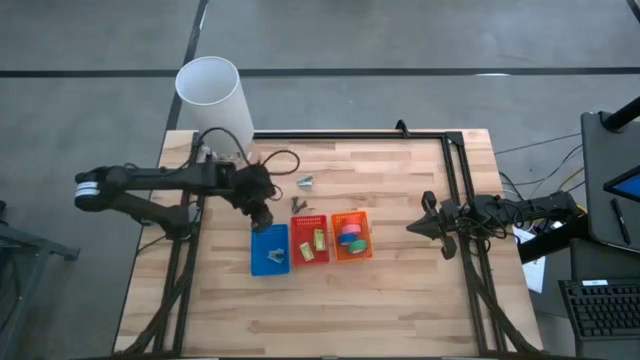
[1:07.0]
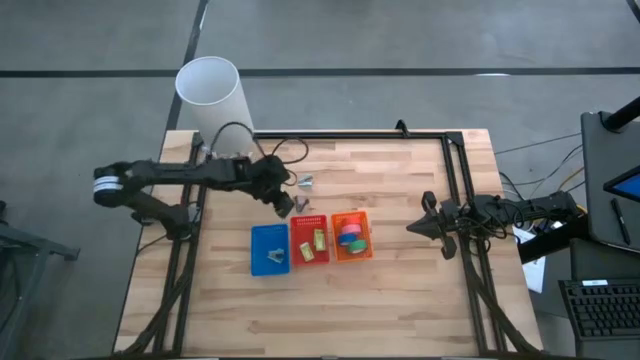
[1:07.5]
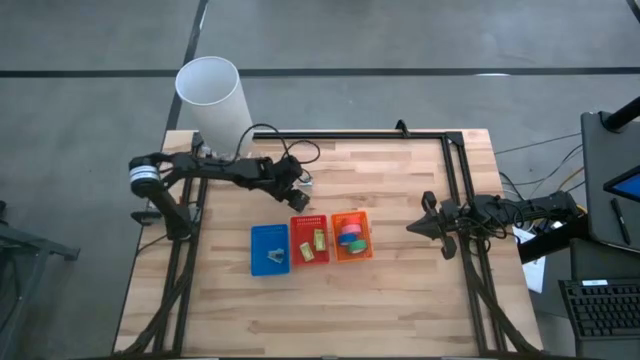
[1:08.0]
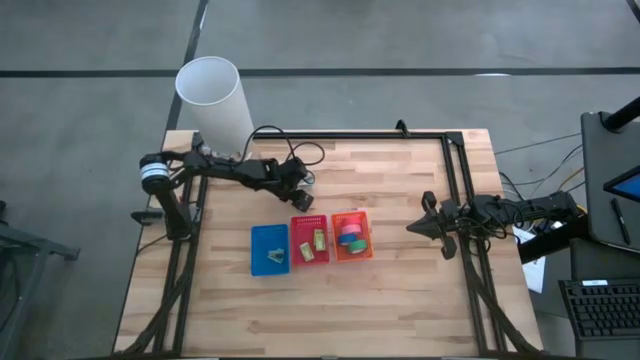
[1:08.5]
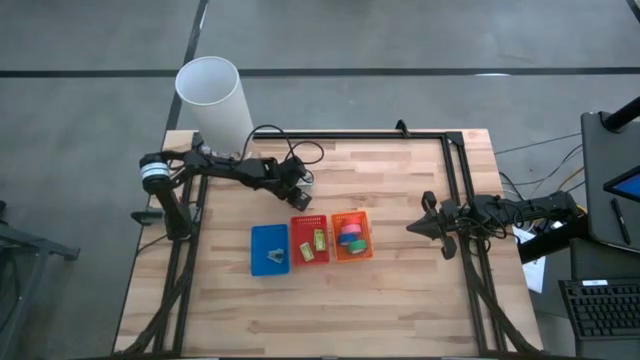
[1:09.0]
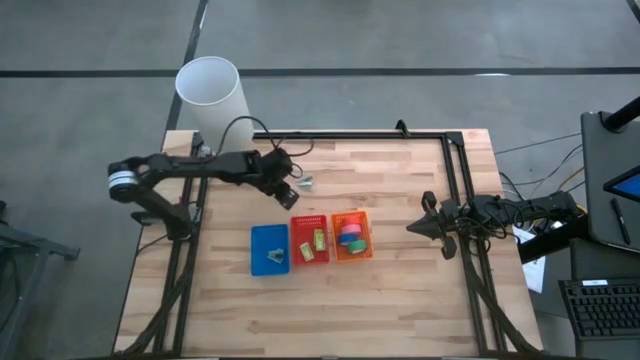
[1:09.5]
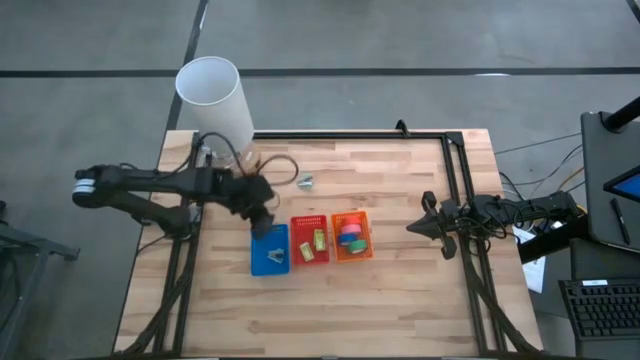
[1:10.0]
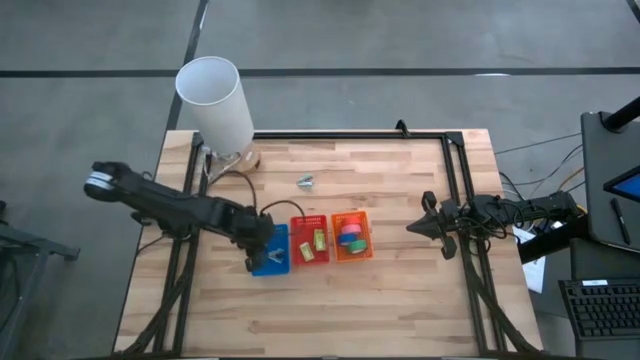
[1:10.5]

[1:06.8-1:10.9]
Task: Pick and place Stapler, Stapler remover, tape
Put the dark blue staple remover into the blue bin

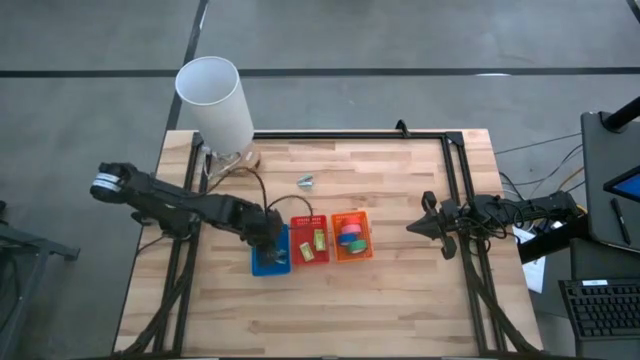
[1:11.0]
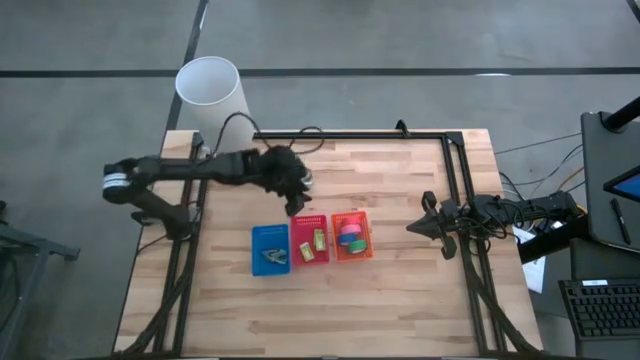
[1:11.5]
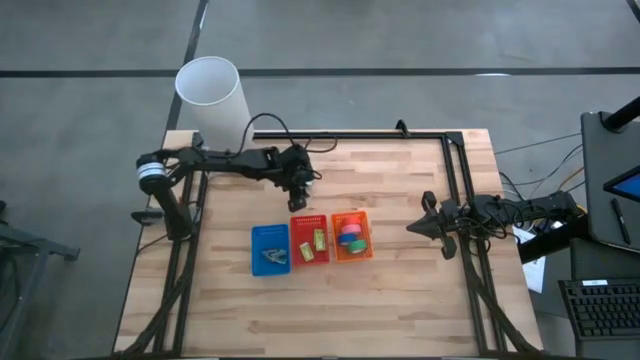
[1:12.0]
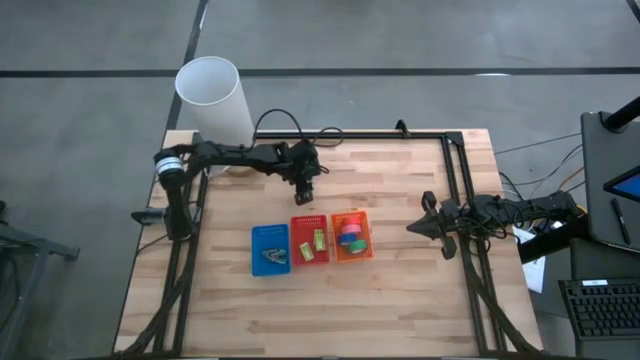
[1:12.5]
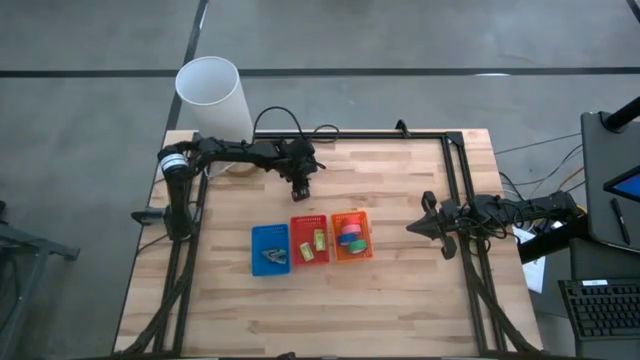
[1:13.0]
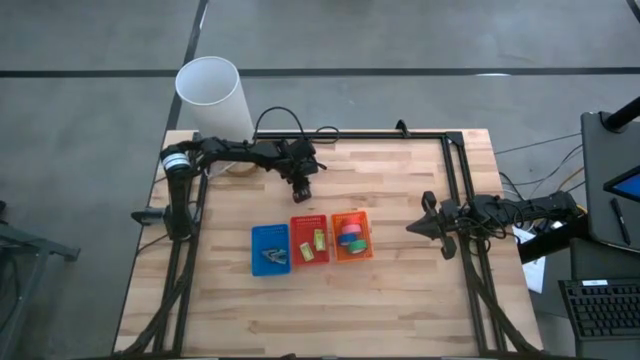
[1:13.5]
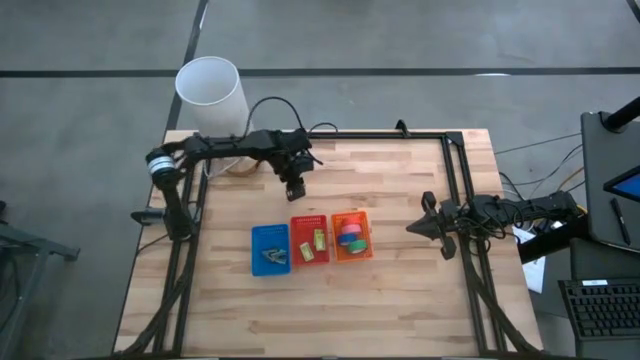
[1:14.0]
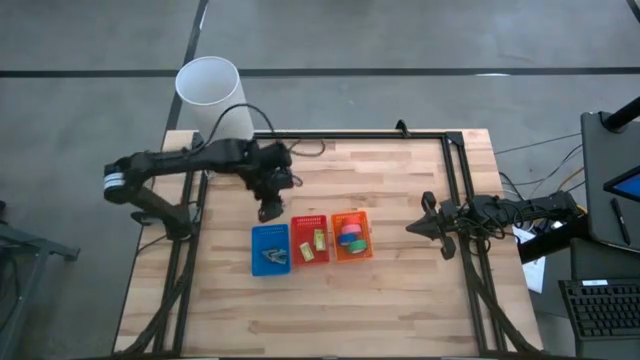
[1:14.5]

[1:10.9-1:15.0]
Put the light blue staple remover into the blue bin

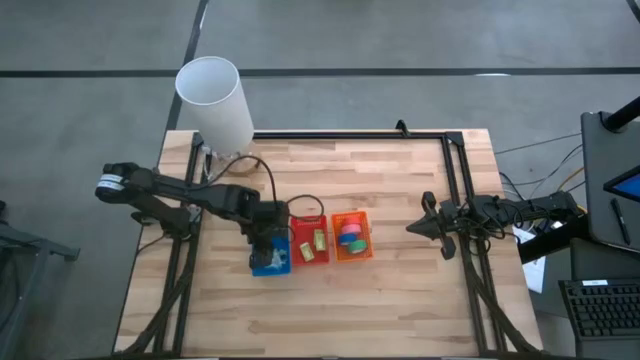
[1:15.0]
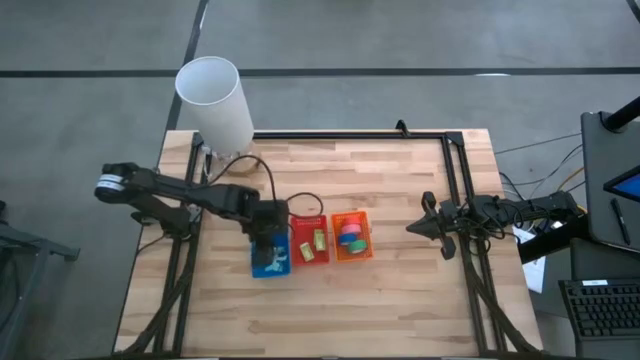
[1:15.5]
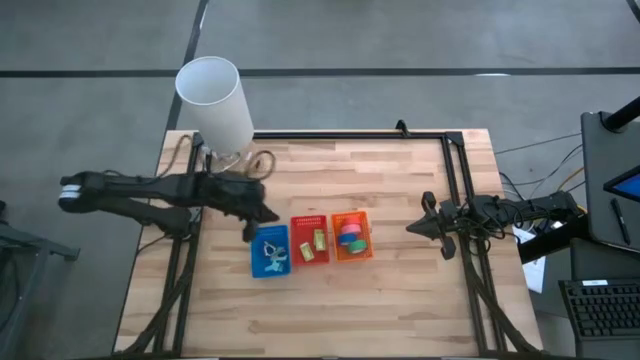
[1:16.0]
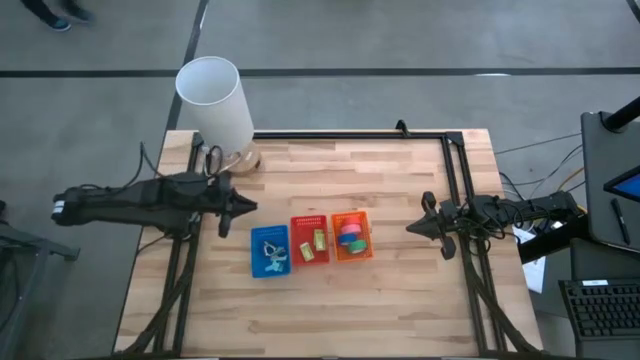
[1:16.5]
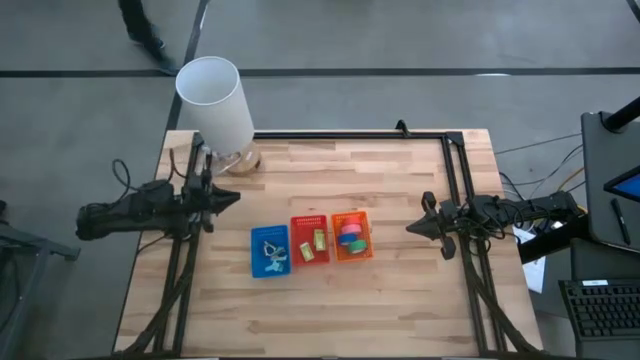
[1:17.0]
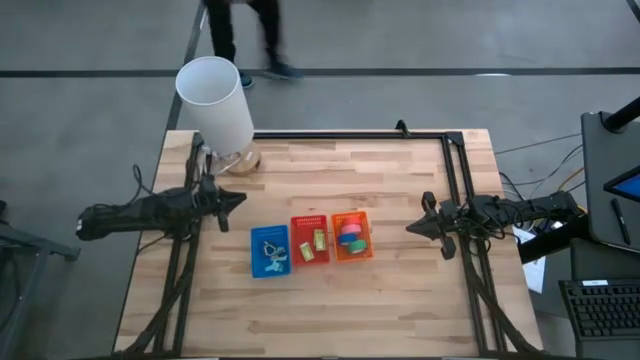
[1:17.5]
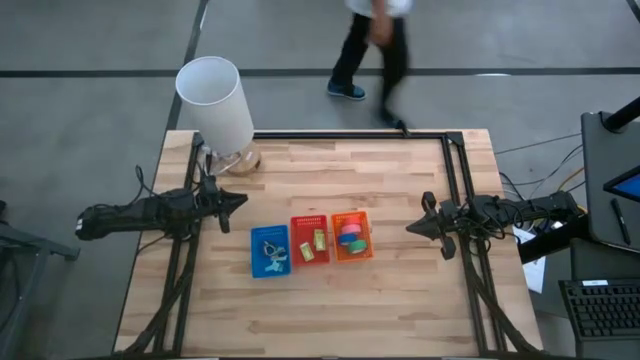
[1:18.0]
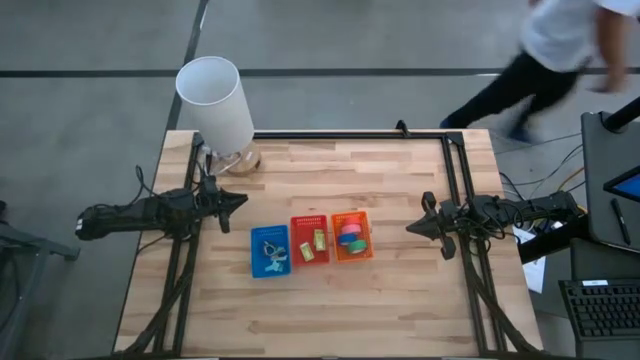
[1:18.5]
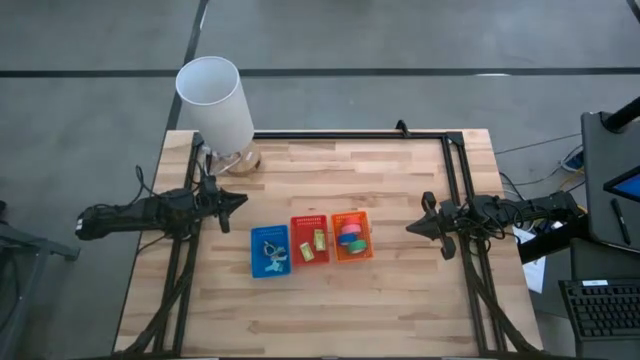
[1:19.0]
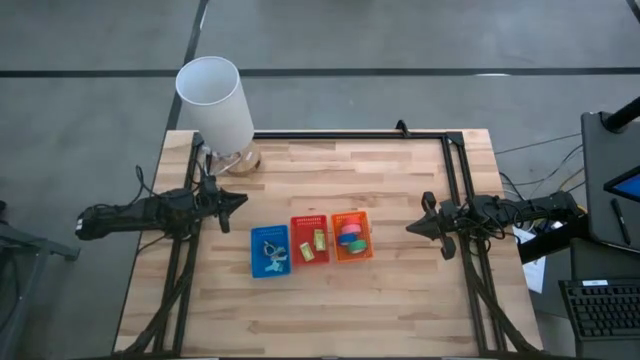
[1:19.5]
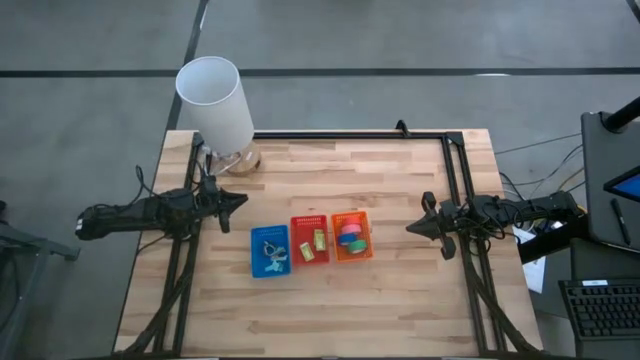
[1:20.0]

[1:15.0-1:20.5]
Return to Home Position

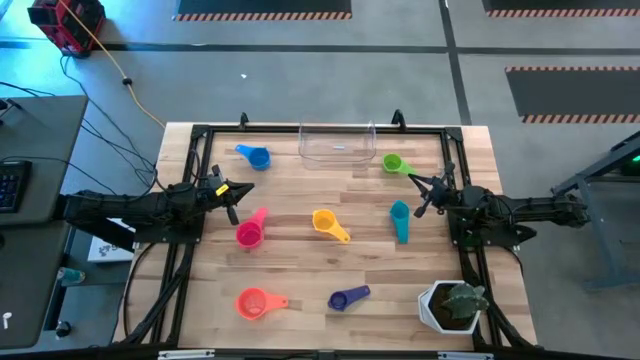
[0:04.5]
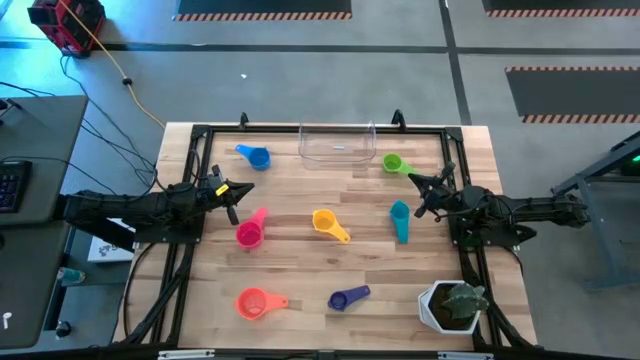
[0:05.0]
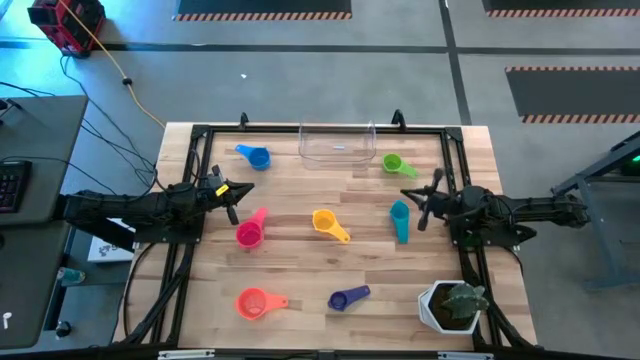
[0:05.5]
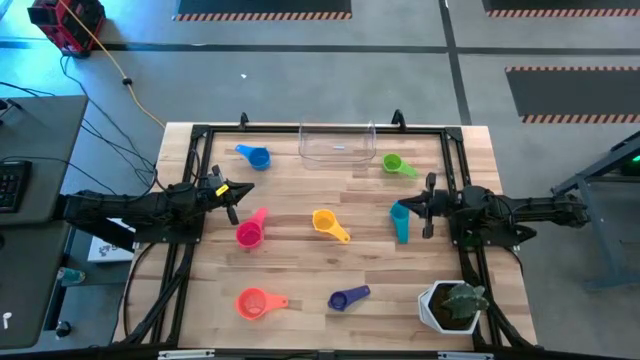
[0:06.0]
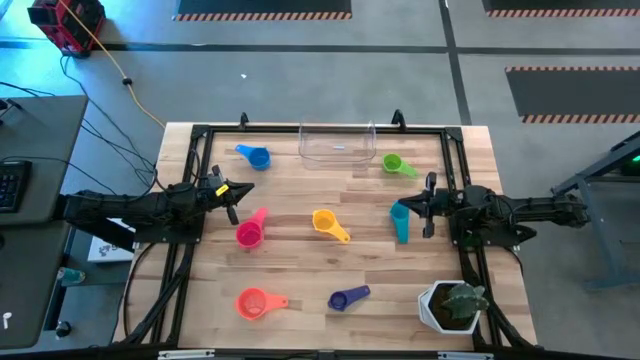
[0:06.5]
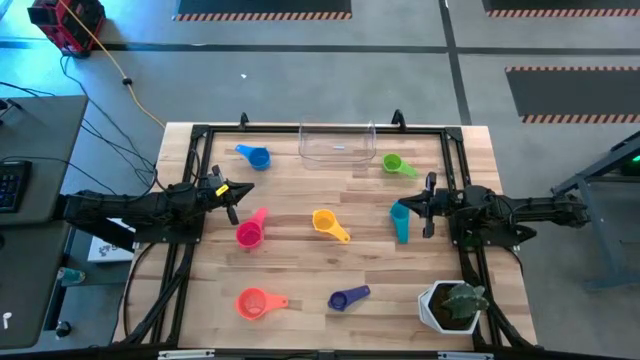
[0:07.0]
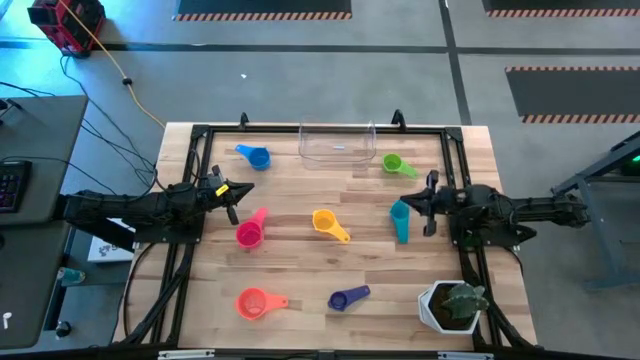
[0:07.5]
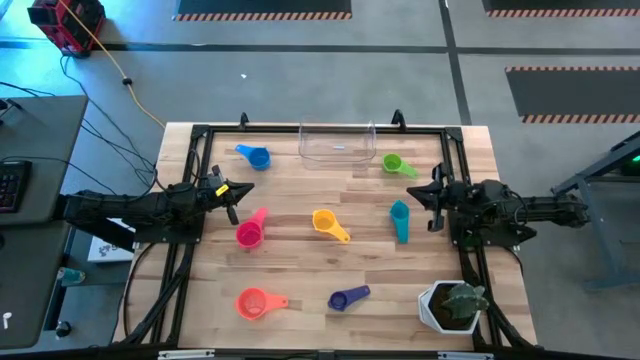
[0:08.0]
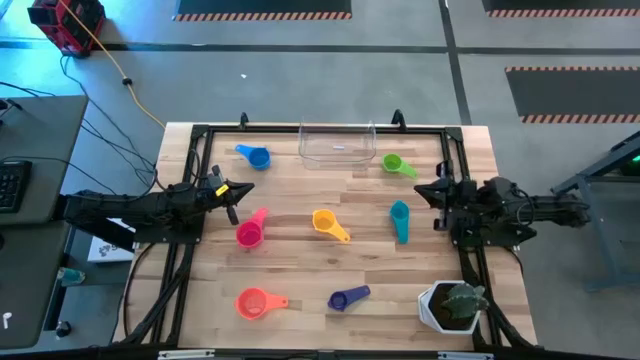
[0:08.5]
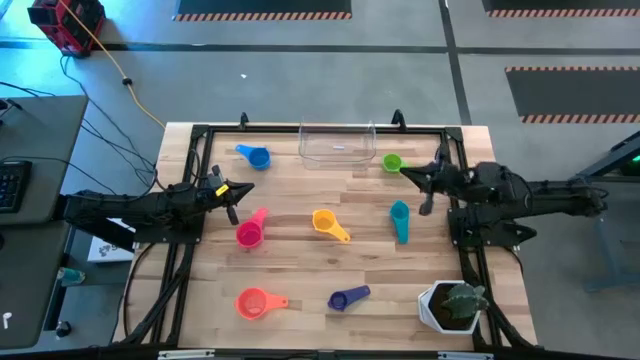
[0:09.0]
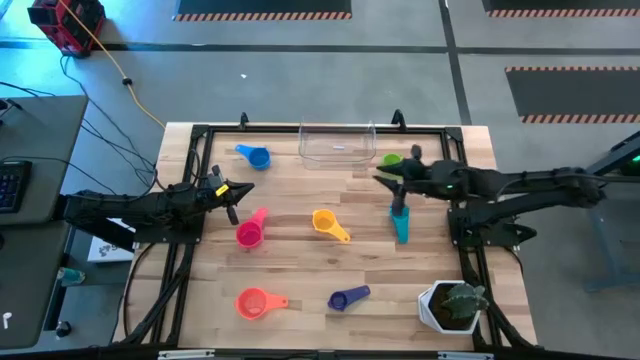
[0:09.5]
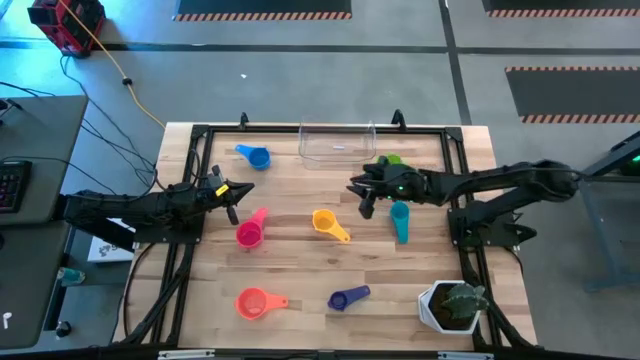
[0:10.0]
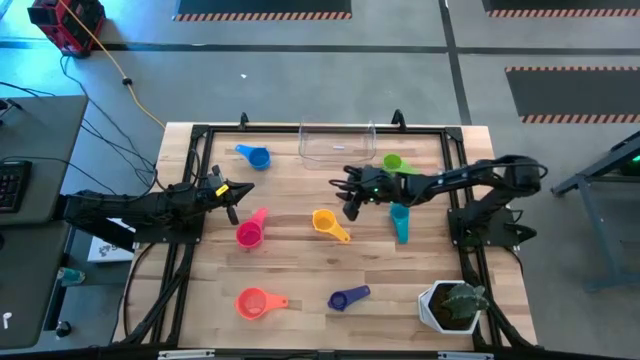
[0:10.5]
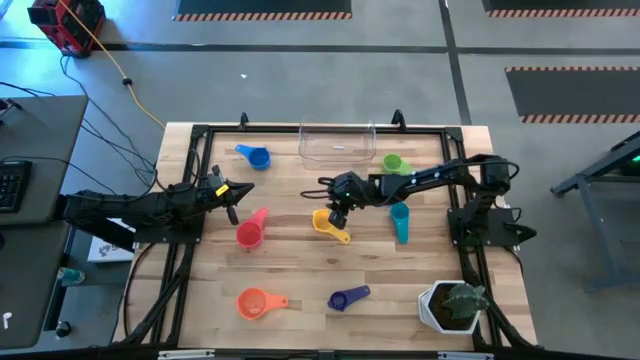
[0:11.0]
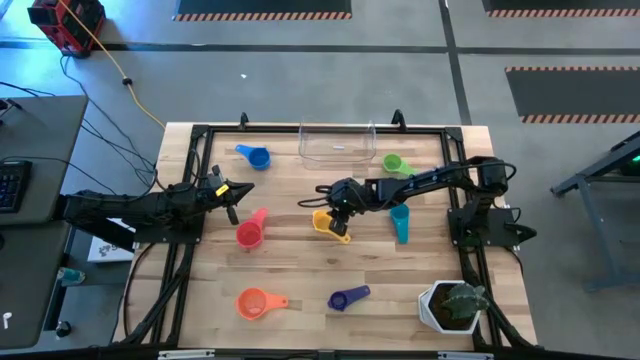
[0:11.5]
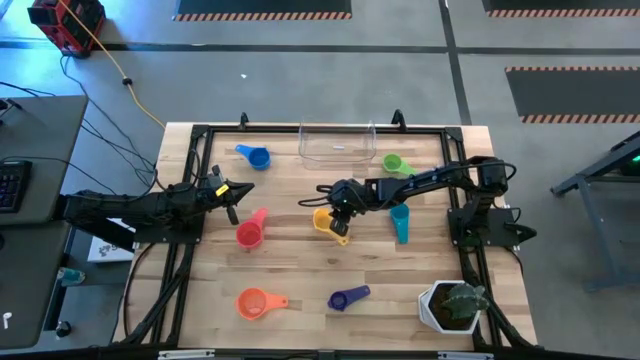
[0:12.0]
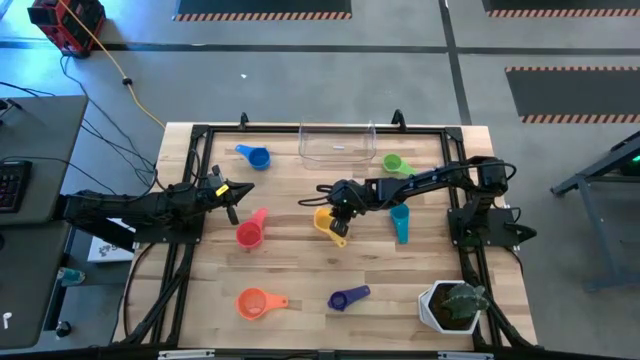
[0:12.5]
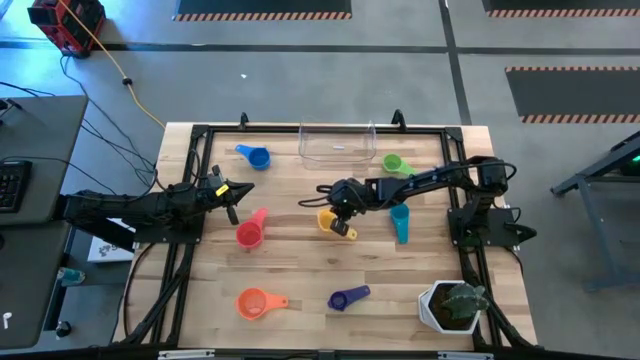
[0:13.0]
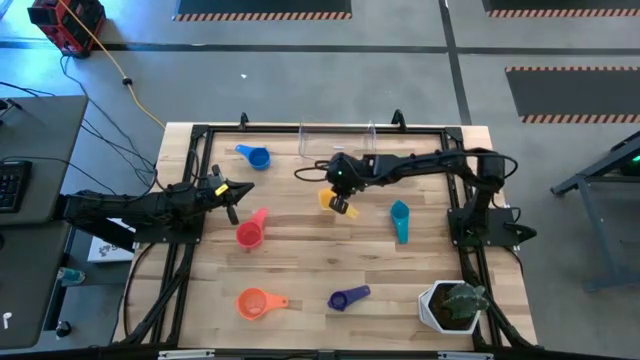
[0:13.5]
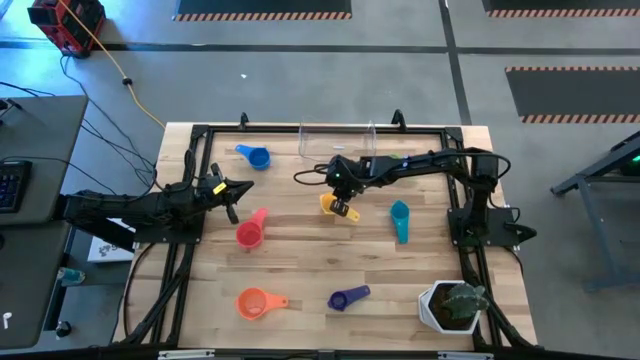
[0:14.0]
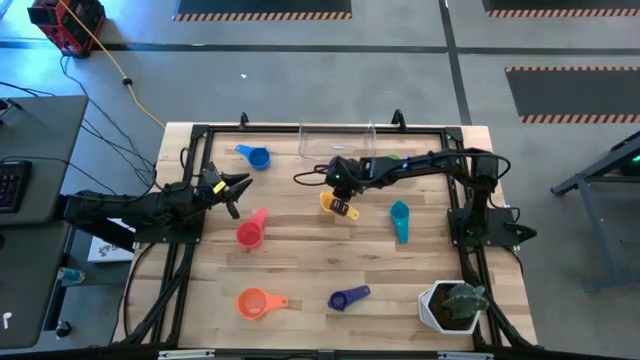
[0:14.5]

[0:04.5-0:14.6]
Task: Nest measuring cups in basket
Adjust the yellow measuring cup
